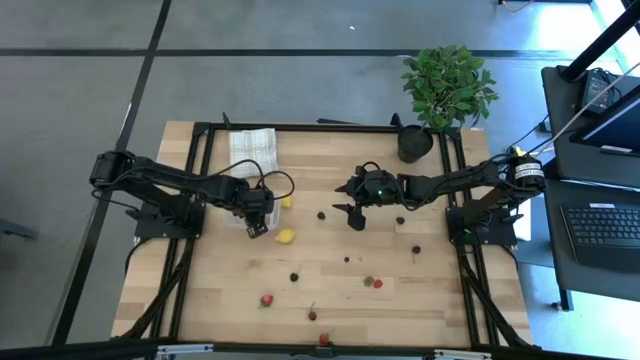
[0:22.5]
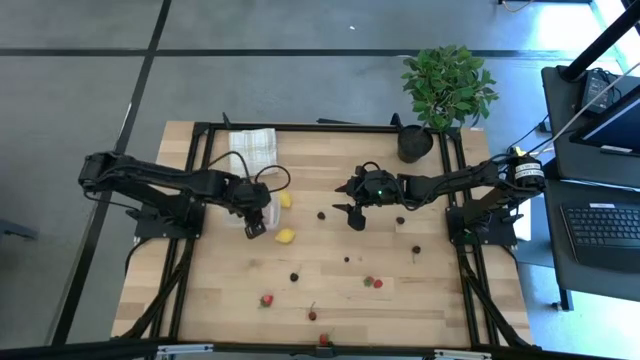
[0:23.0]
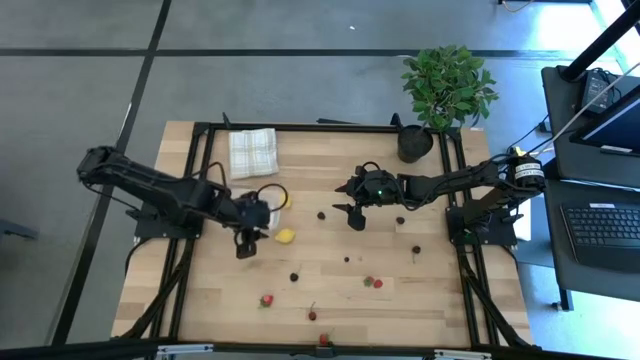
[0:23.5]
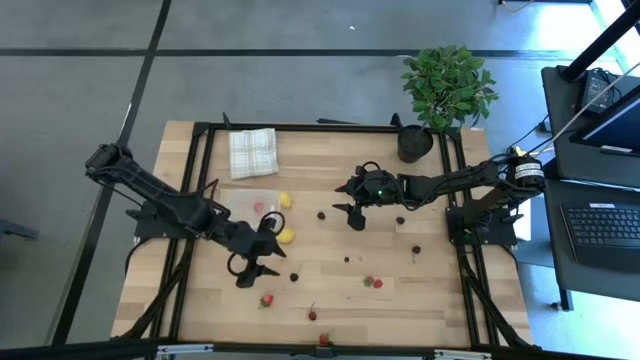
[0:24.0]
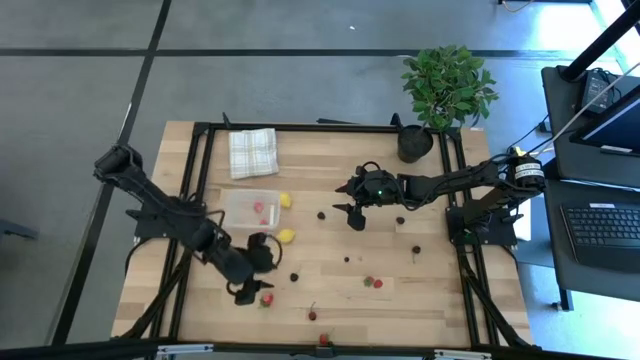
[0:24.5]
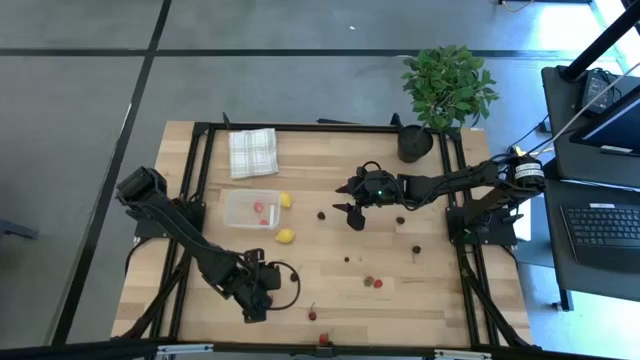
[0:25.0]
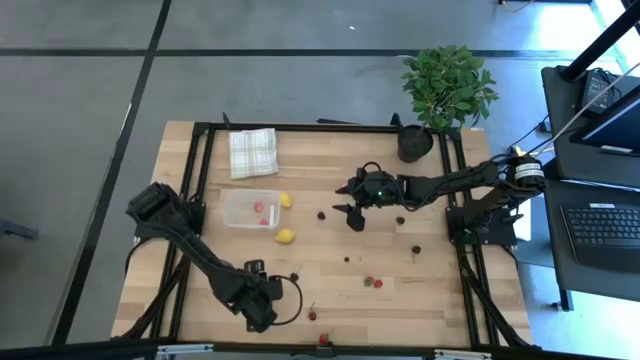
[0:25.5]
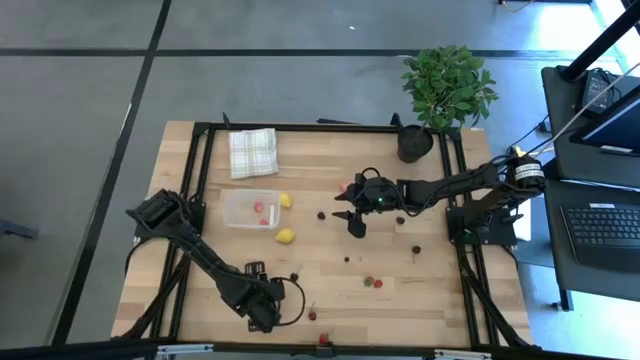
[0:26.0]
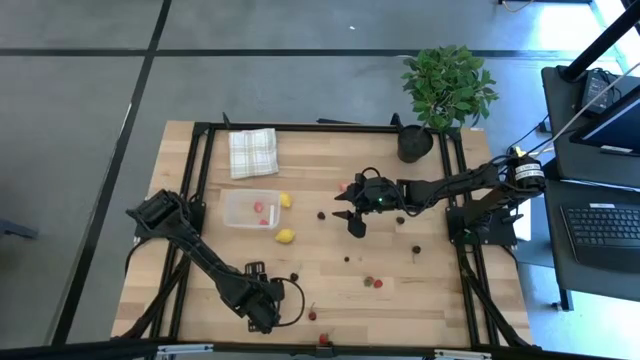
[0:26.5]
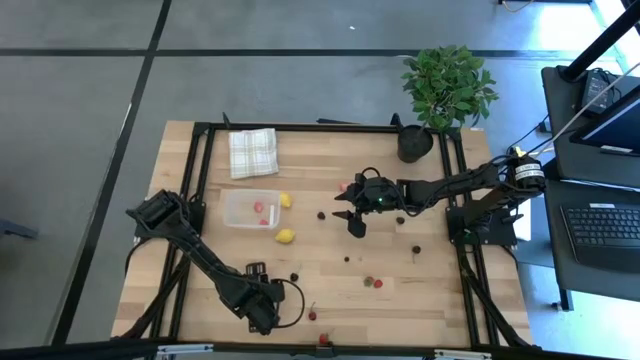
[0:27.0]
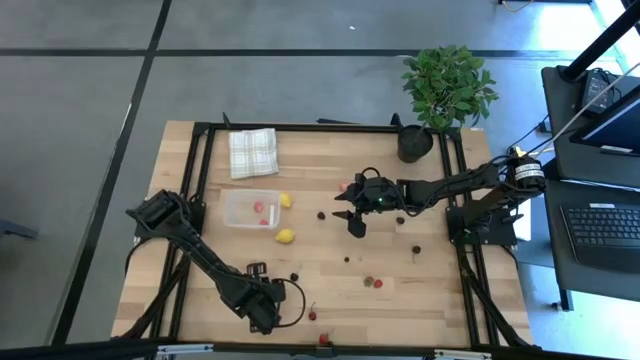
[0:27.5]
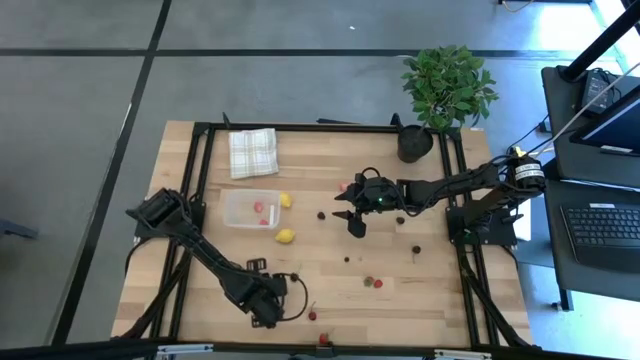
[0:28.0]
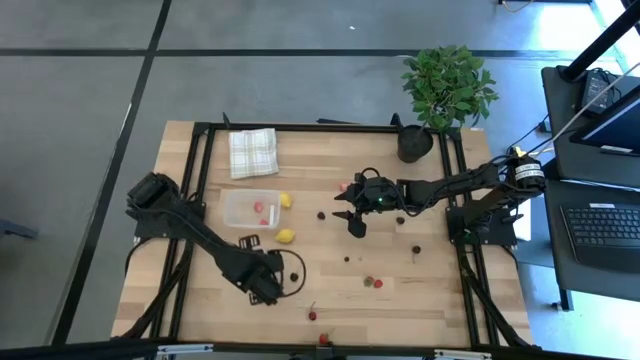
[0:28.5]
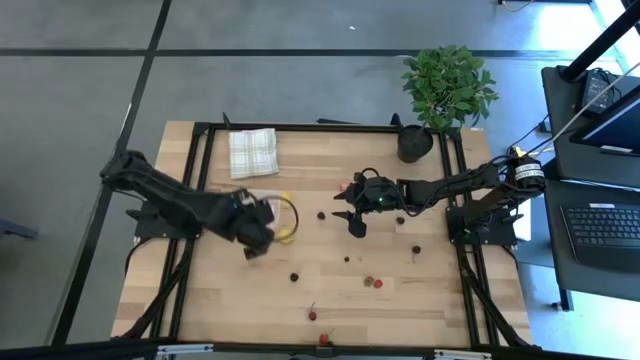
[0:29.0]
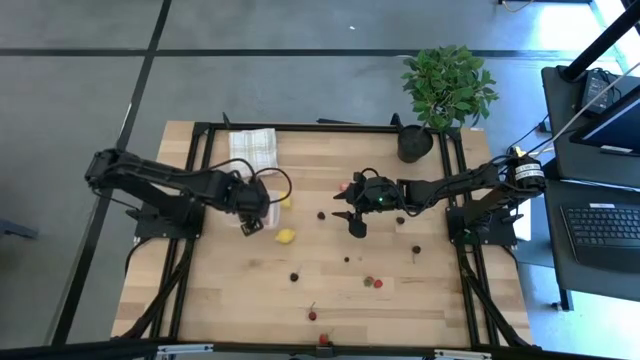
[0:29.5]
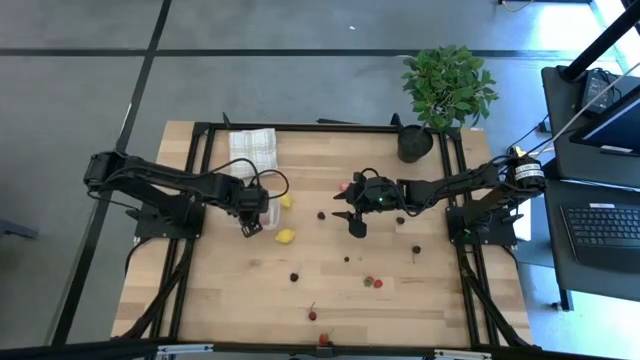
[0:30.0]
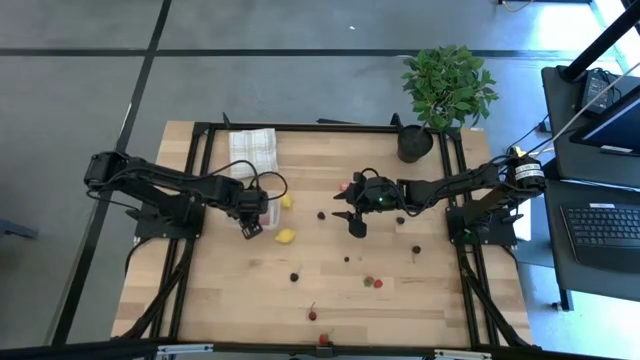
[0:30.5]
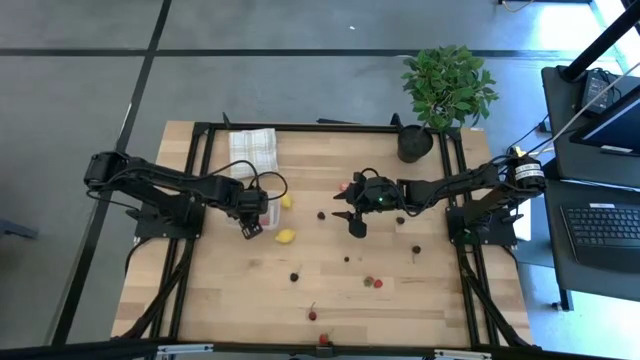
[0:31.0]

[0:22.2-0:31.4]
Task: Pick and placing Produce into tupperware
Put the middle left red strawberry into the transparent bin

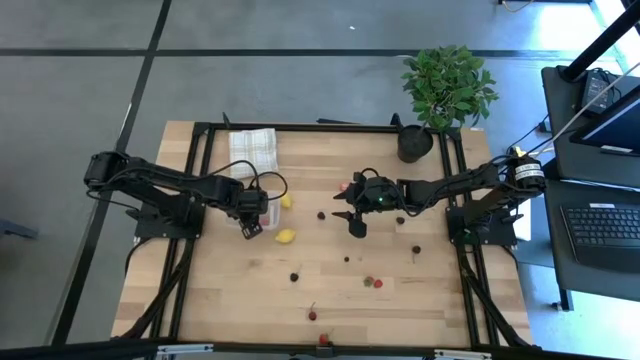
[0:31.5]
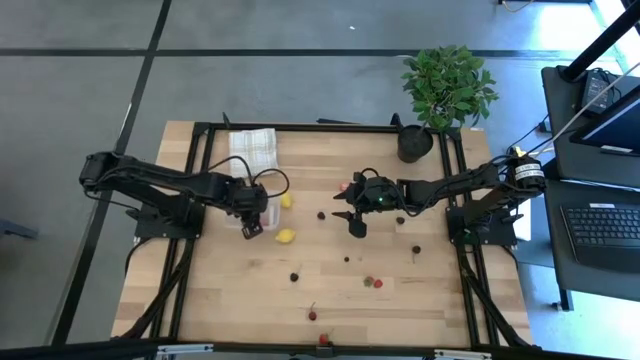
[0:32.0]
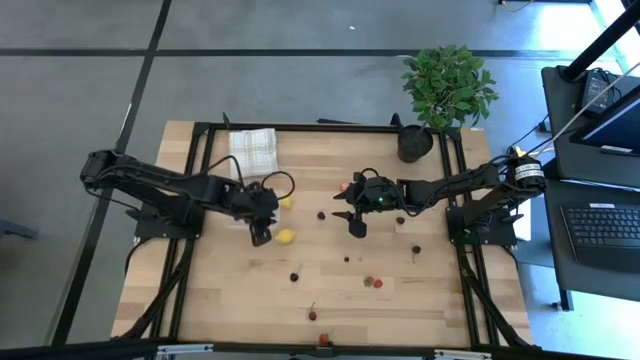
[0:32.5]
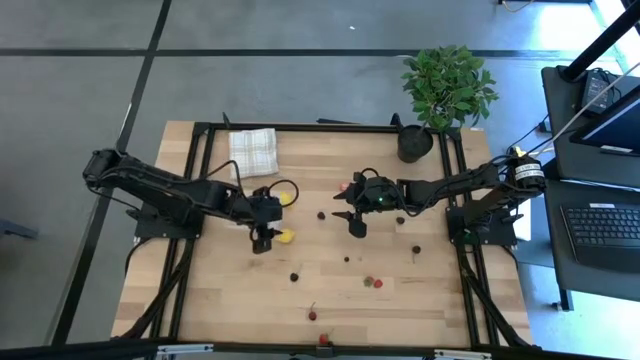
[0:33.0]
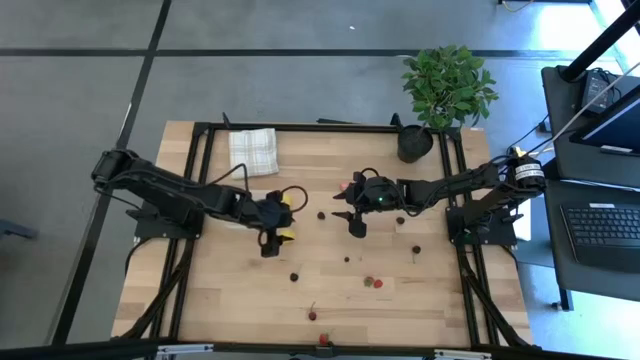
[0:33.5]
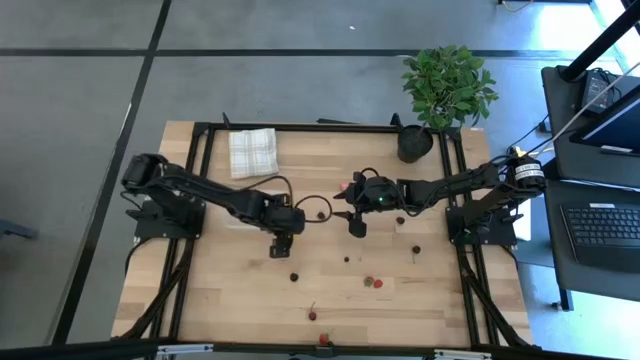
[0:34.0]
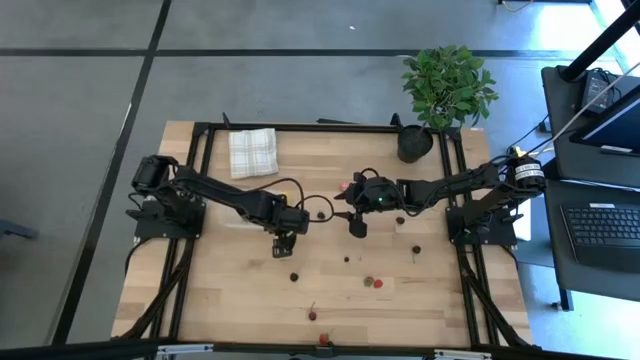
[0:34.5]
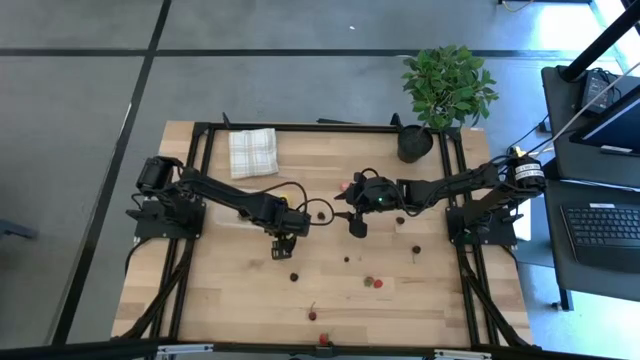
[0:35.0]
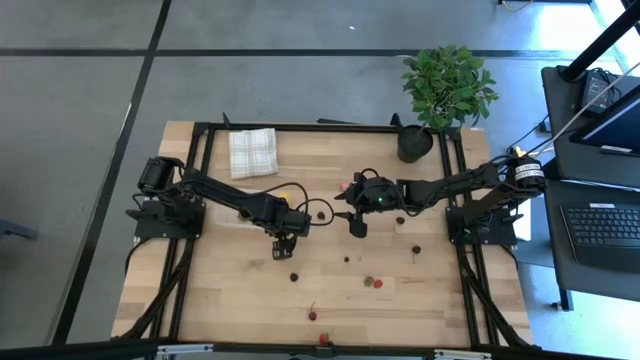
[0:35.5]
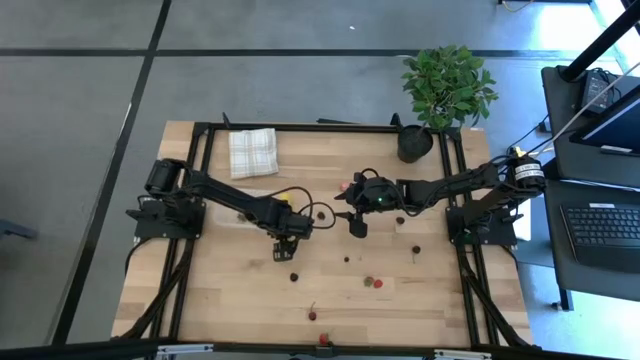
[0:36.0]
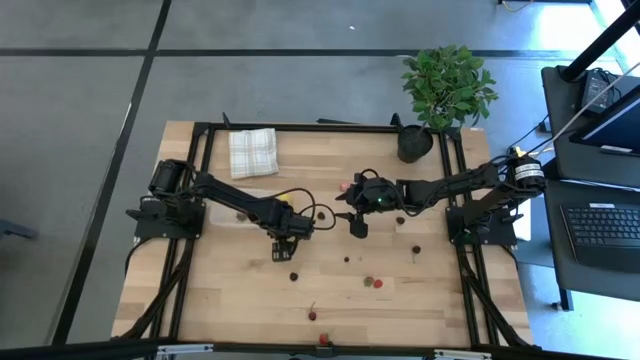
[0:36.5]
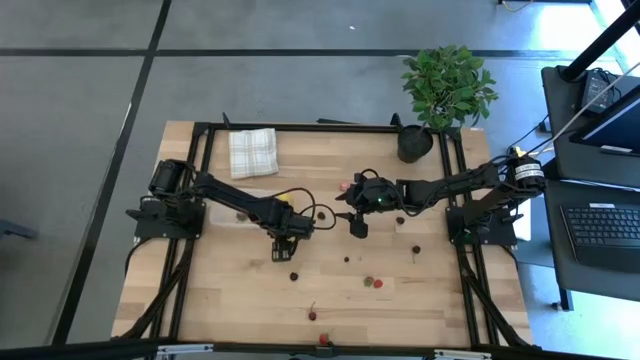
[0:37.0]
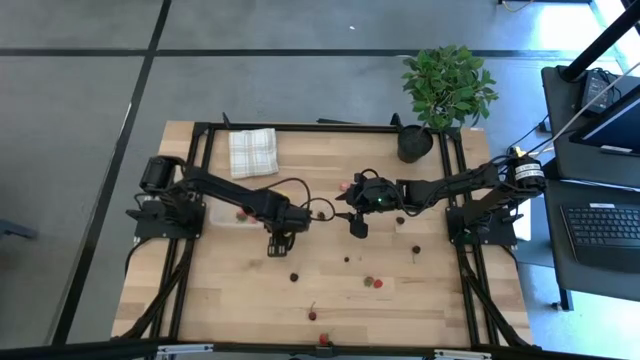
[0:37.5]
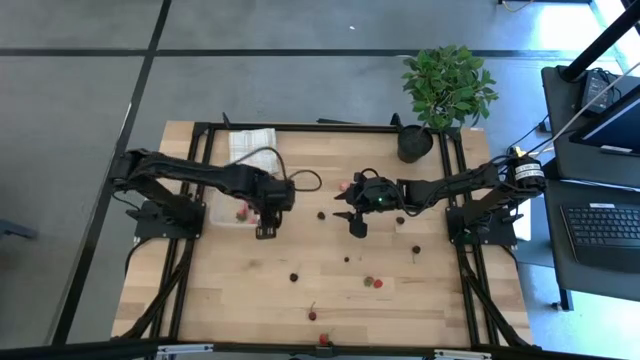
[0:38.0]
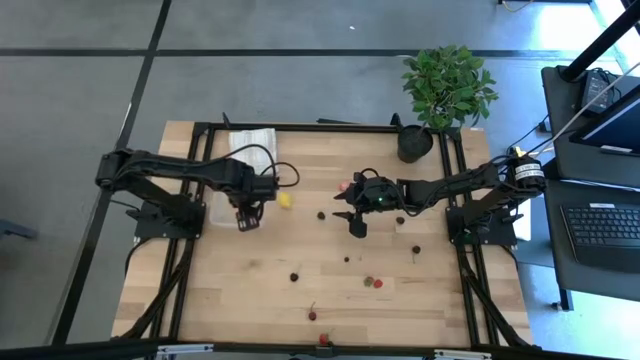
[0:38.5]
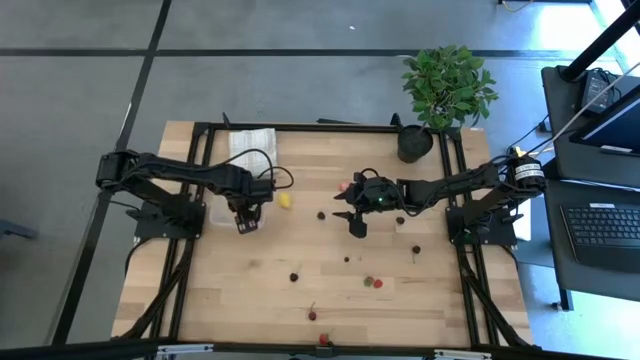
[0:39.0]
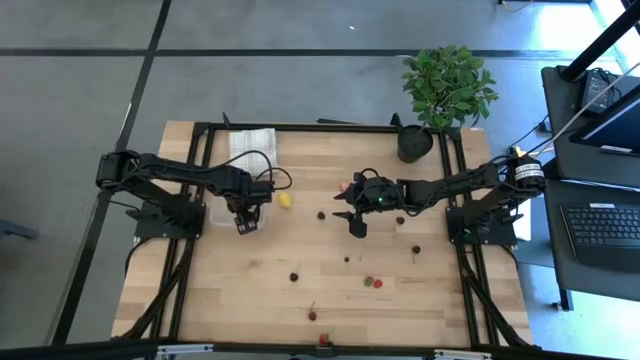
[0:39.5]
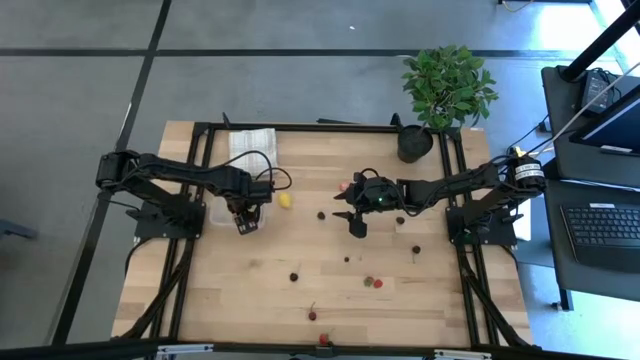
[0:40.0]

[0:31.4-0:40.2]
Put the bottom yellow lemon into the transparent bin

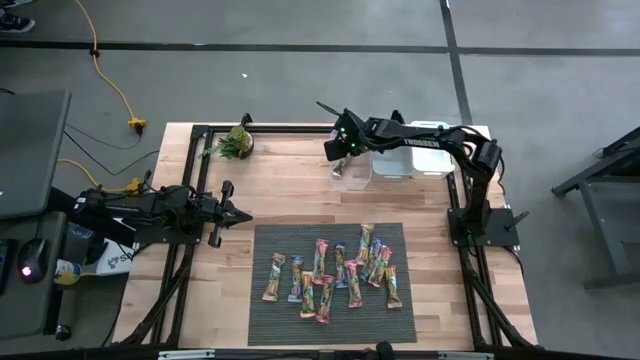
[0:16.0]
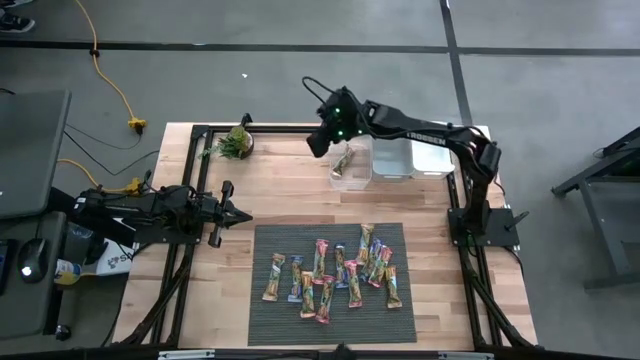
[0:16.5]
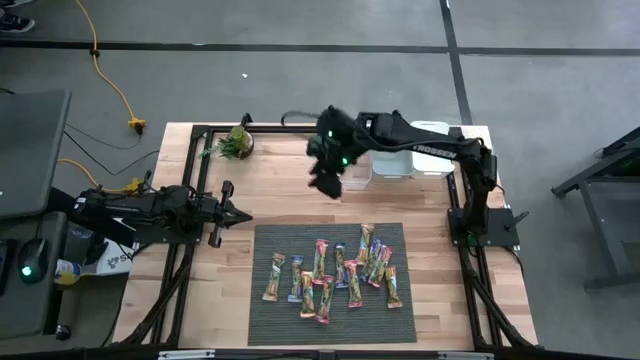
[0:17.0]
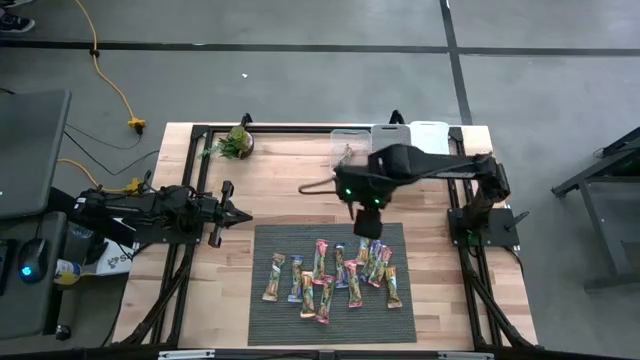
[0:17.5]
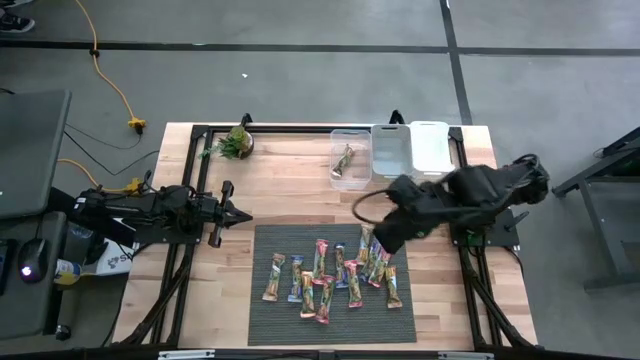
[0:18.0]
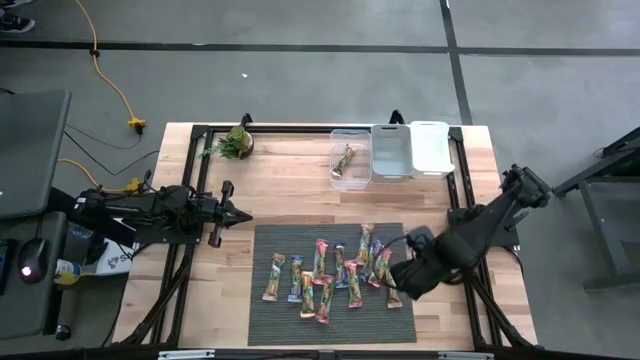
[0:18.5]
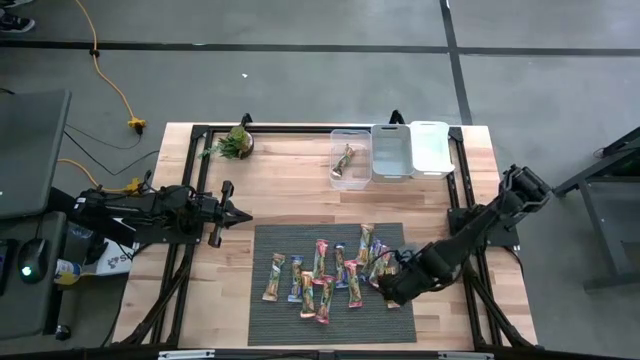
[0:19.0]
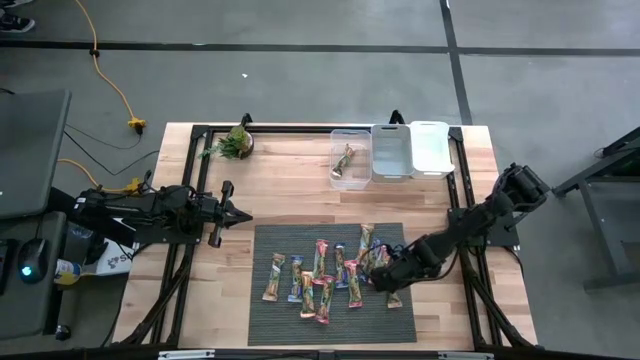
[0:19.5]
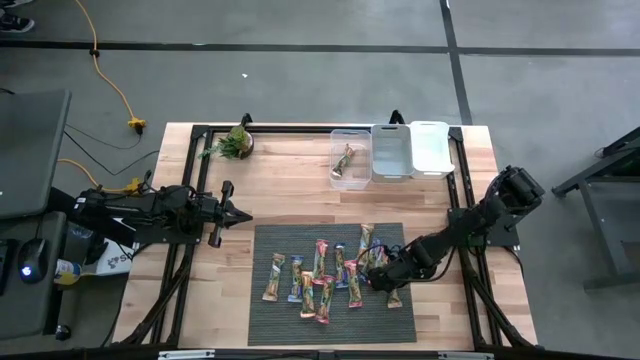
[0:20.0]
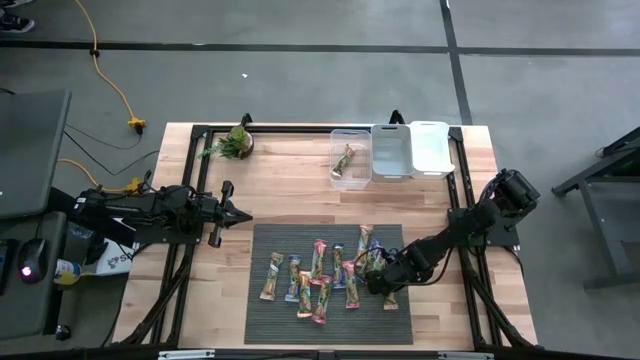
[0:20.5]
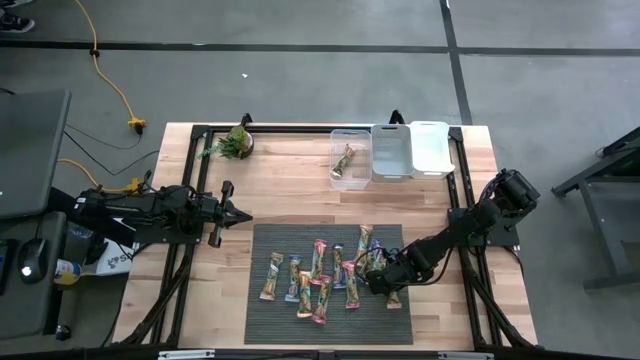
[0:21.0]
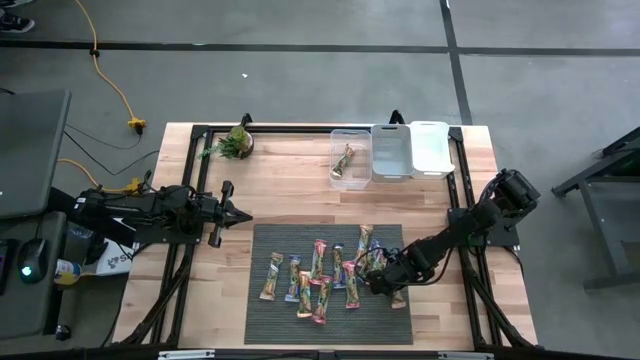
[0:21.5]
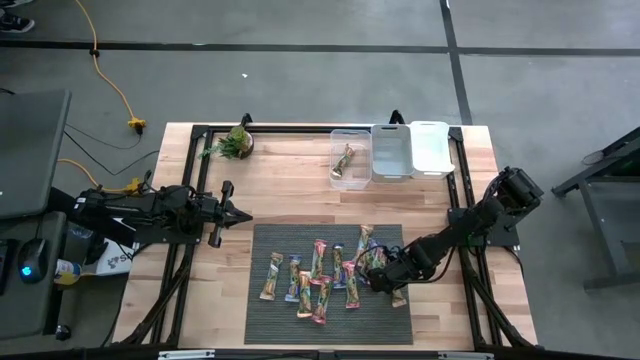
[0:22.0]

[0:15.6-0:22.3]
Task: Pick and place Granola Bars by type
Put the yellow granola bar into the transparent bin
